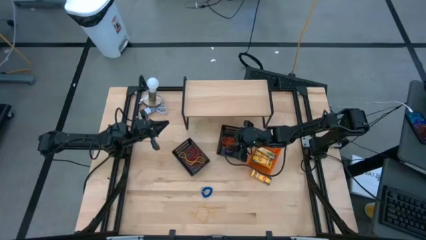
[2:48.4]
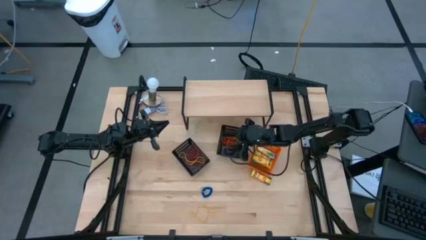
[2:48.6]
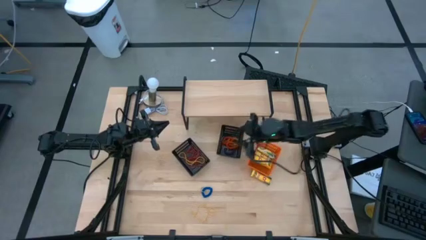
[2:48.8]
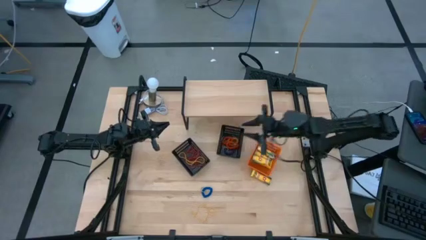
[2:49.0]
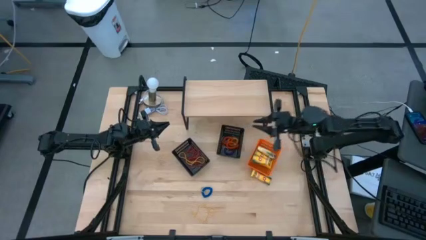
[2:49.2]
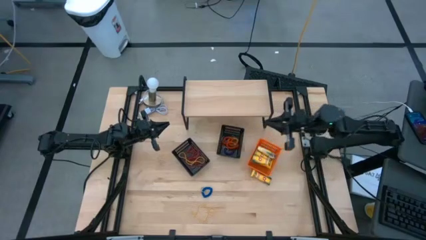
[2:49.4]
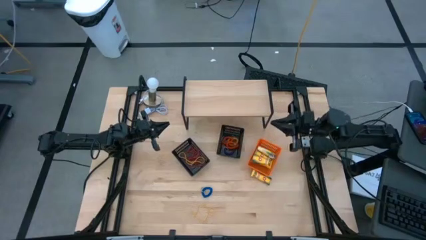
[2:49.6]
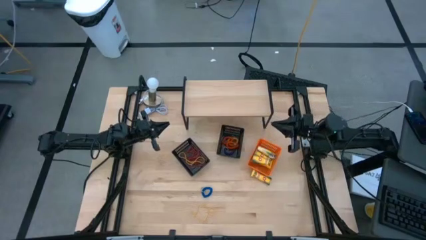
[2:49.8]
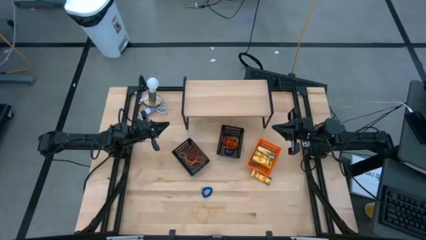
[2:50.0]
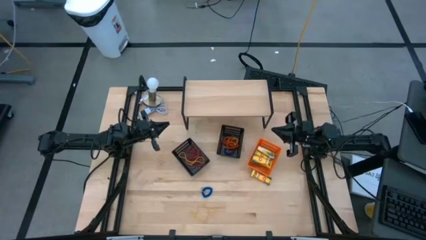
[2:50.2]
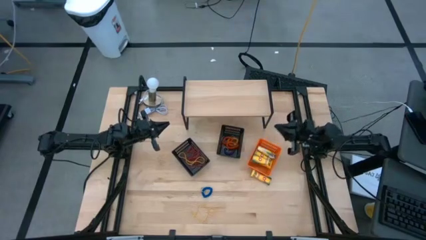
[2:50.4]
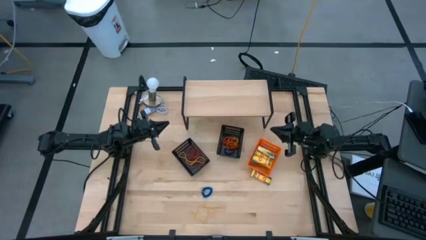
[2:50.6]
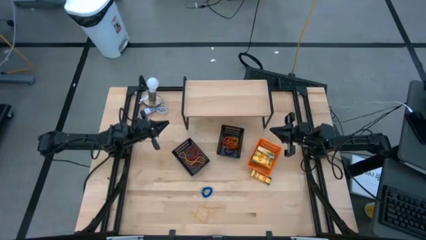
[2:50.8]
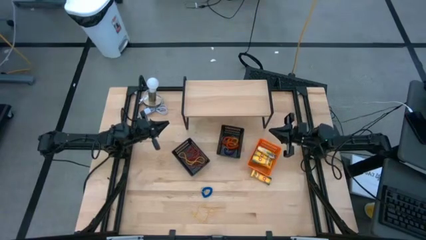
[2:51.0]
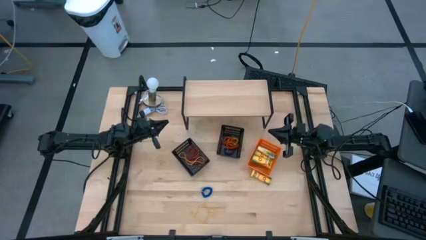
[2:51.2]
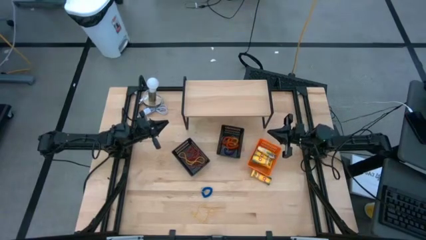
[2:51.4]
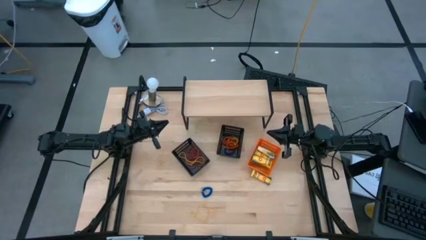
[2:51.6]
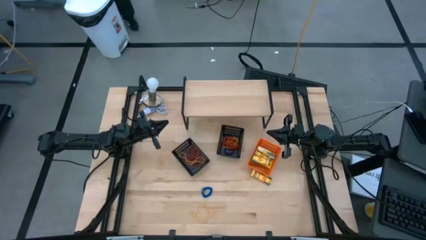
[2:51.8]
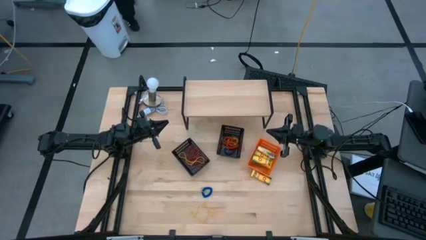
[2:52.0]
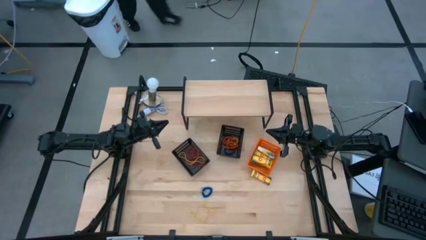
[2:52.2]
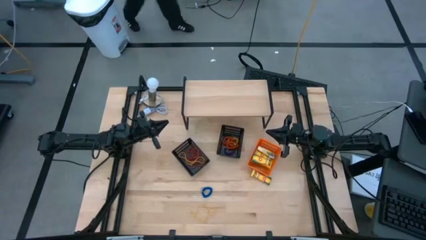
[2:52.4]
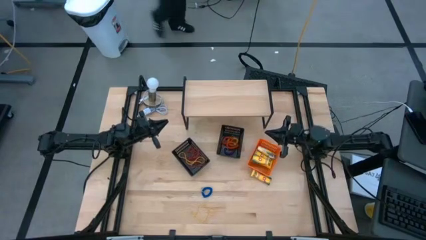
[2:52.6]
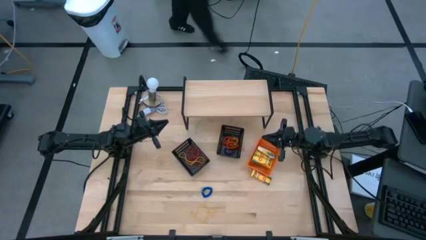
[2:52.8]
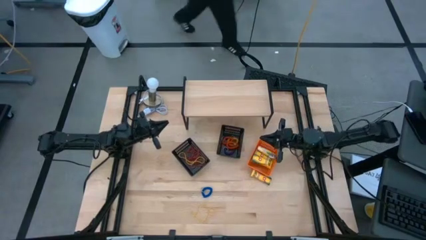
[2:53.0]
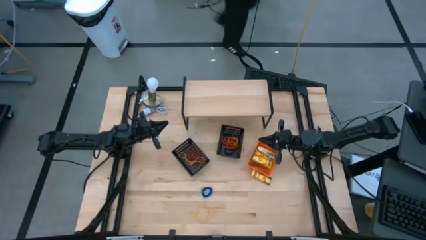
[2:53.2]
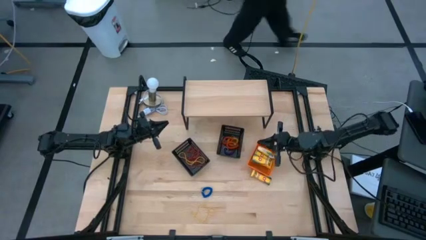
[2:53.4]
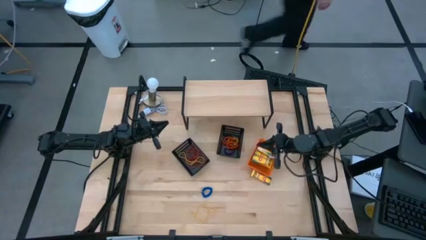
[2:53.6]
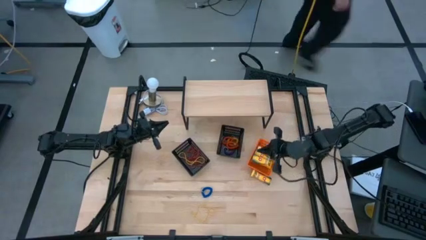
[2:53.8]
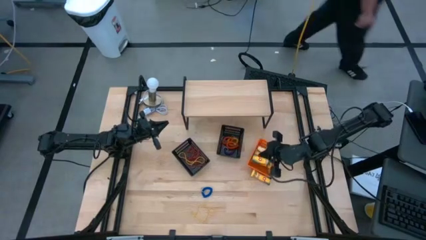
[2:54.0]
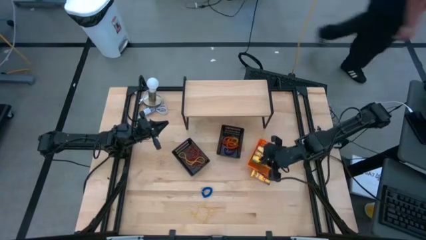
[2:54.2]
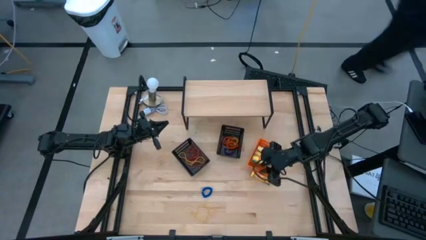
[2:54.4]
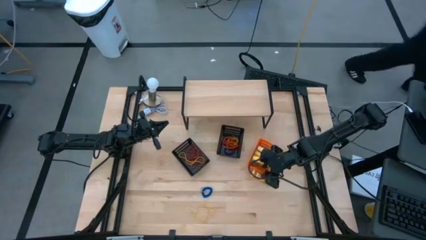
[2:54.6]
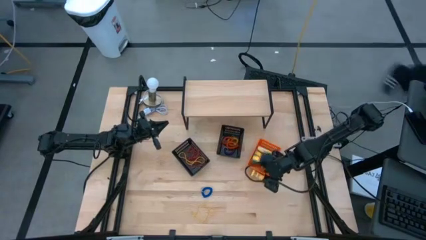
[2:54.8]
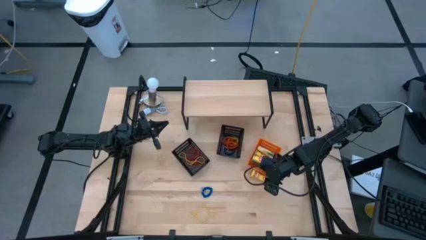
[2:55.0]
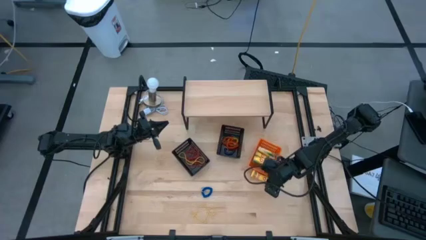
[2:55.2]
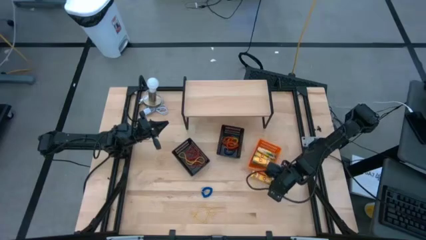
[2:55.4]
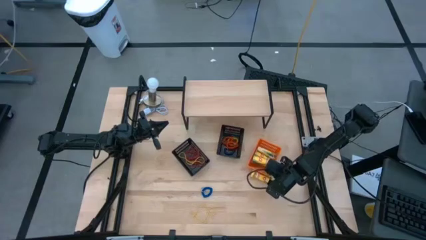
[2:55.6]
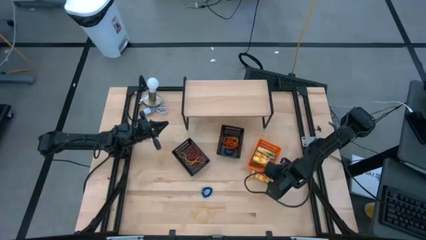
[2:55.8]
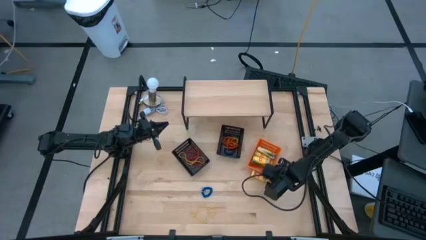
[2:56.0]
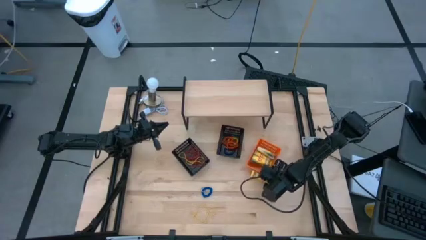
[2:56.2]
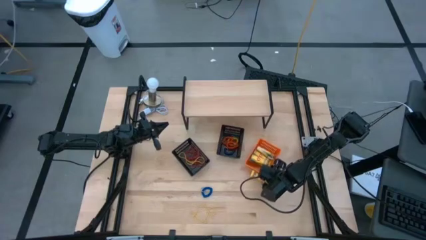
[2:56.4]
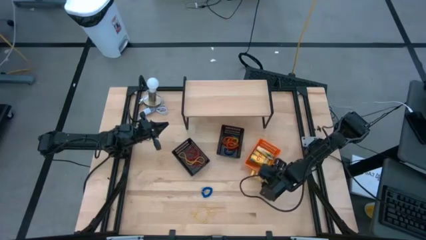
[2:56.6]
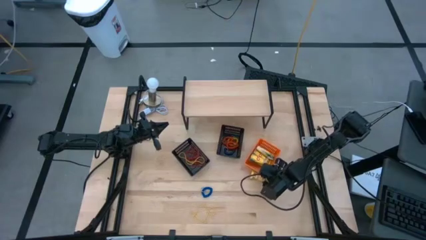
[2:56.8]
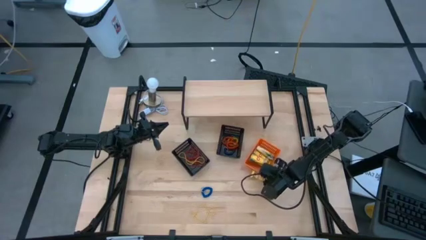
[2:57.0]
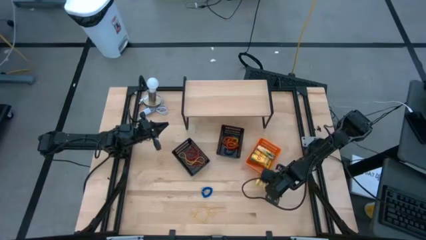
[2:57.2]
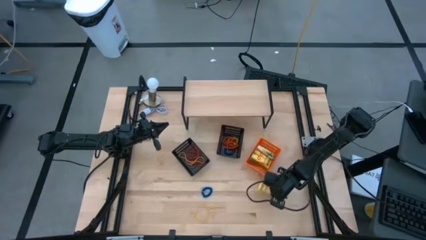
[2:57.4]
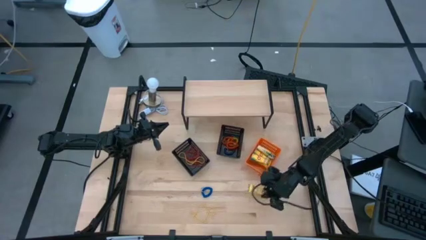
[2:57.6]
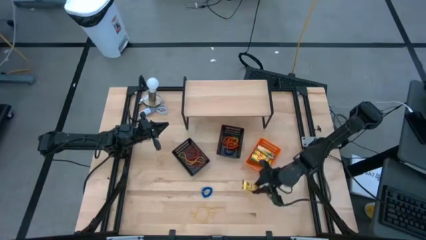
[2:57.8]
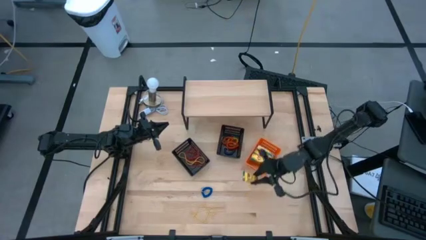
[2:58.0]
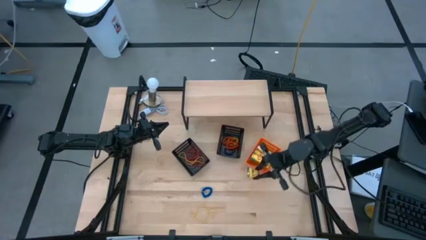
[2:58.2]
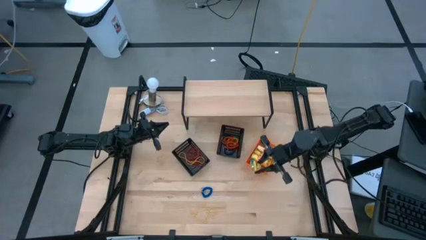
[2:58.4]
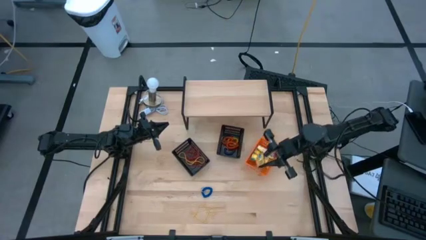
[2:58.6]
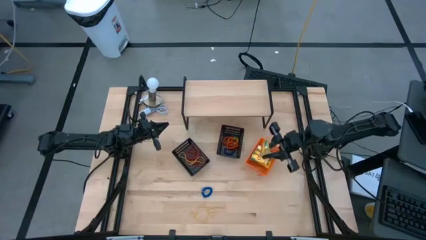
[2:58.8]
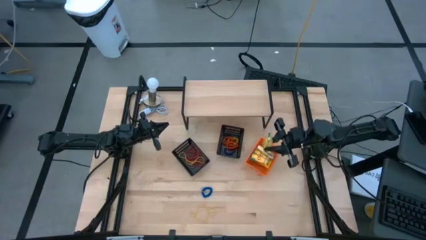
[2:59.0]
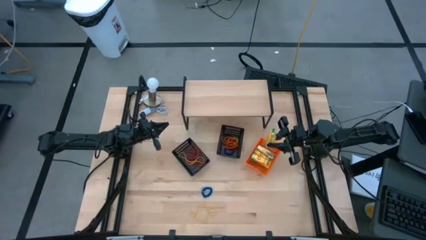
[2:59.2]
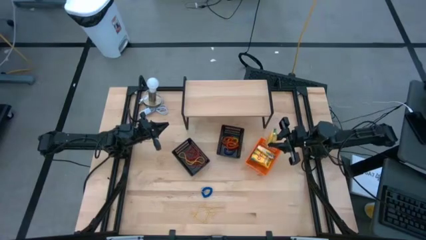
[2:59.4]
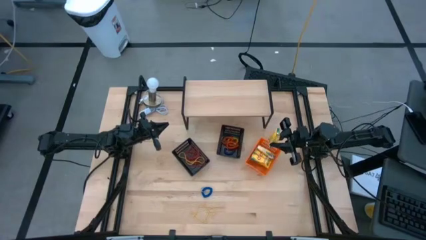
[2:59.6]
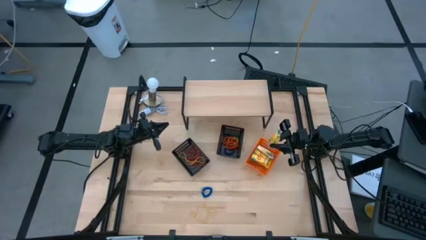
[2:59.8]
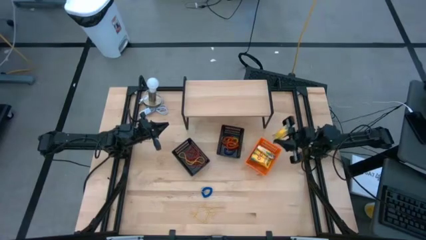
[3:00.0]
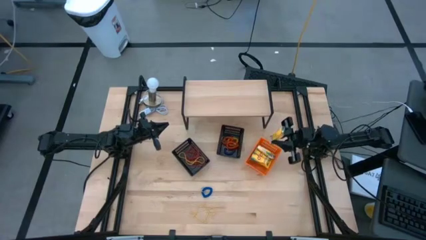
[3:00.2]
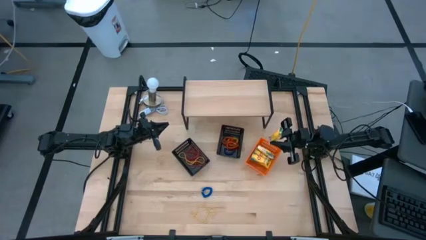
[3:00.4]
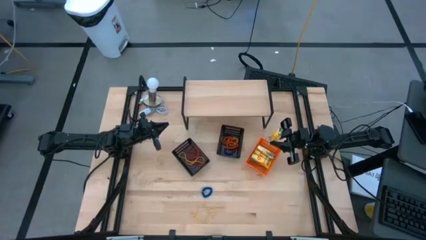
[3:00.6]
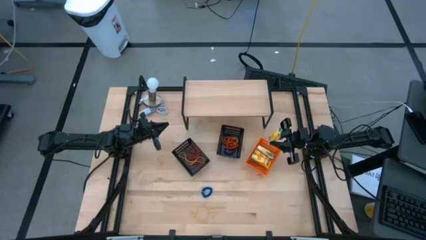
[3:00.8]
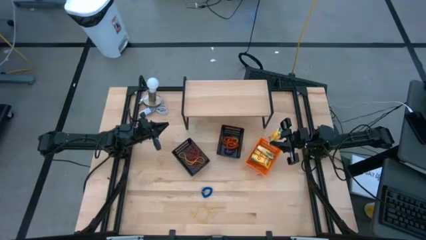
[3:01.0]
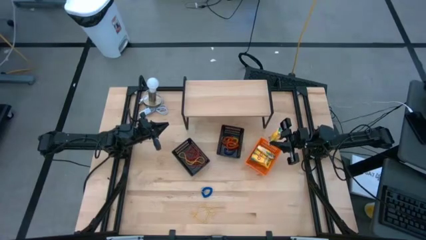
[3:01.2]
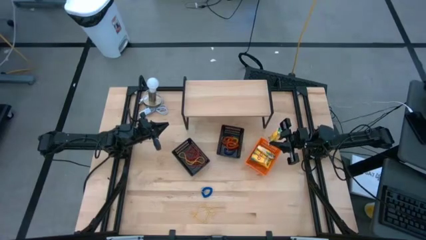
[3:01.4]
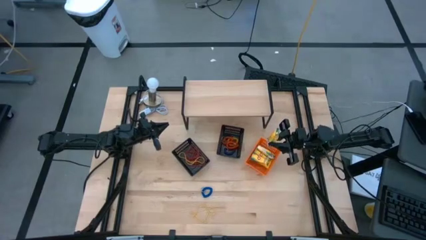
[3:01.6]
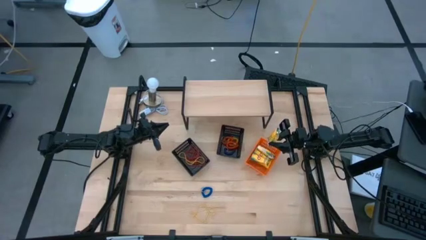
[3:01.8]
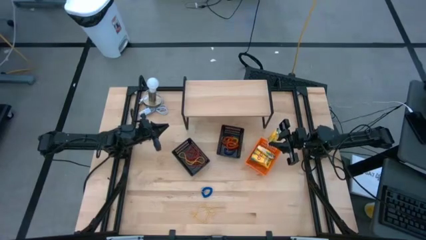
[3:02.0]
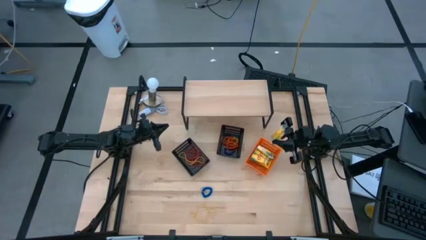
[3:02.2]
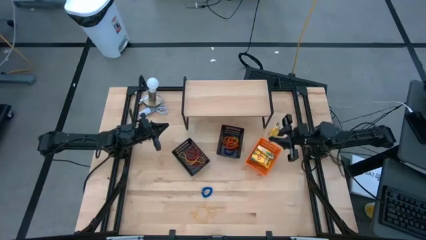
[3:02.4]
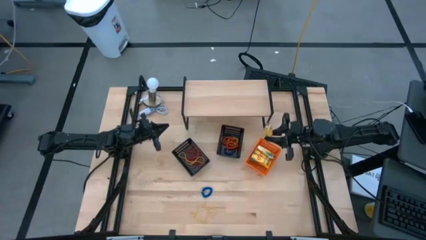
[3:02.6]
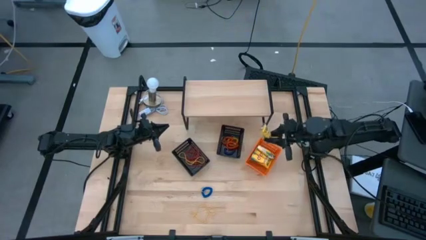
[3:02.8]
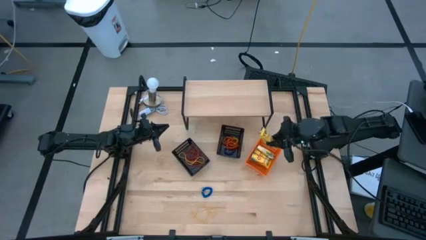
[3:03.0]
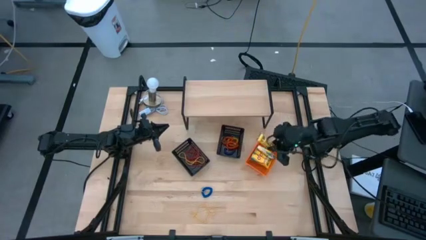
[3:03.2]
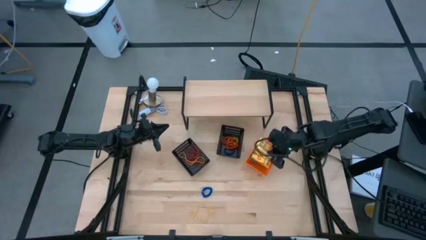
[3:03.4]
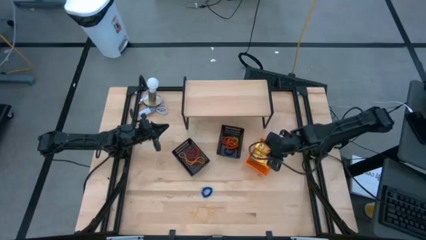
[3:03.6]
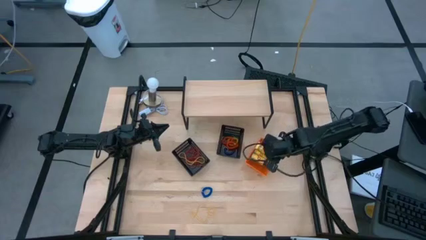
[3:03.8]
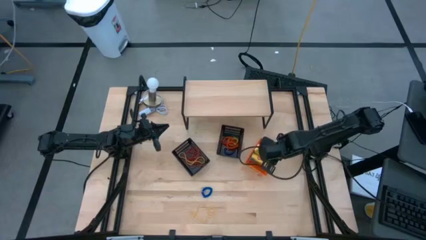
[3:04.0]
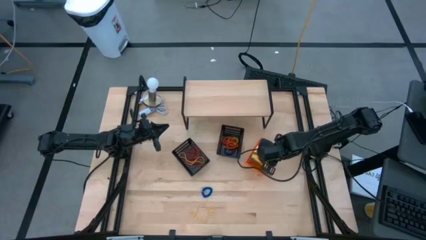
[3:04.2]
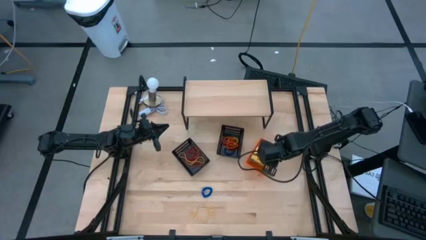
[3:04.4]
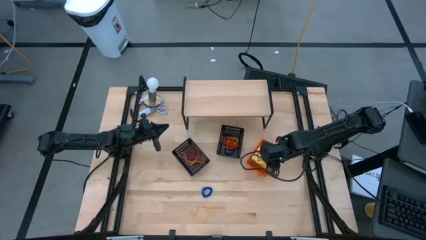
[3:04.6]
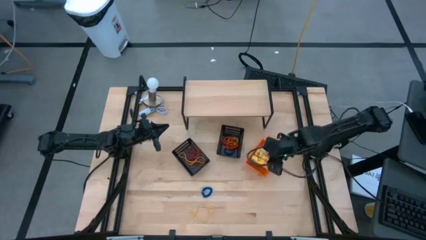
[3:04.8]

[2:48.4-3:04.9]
Task: Pick & Place Office Desk Supplies
Put the crayon box into the orange bin
